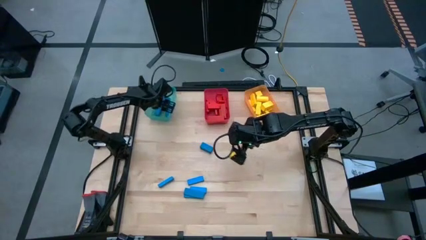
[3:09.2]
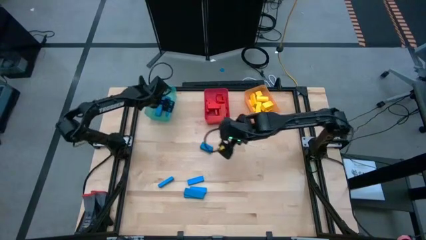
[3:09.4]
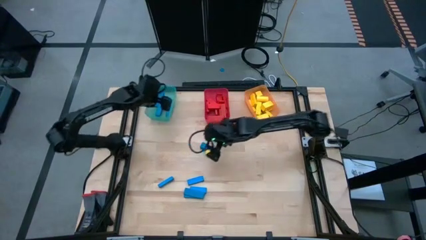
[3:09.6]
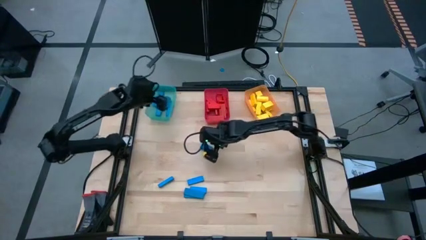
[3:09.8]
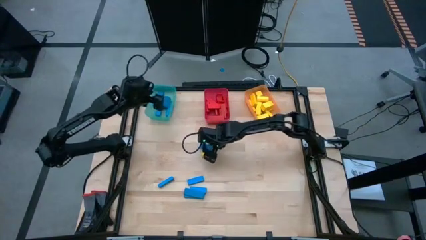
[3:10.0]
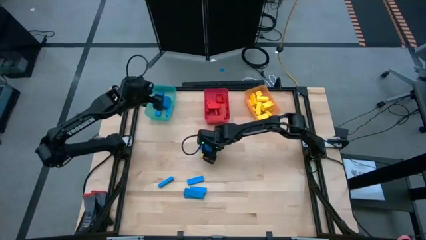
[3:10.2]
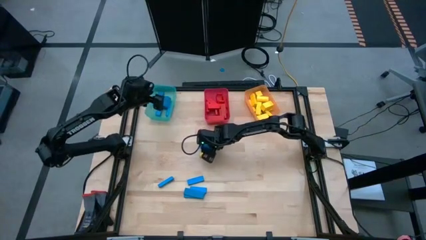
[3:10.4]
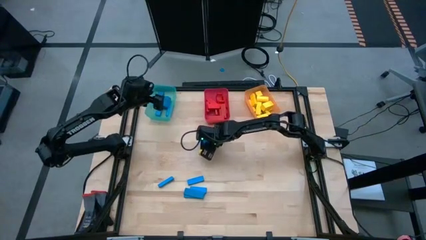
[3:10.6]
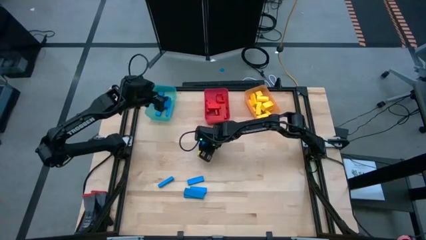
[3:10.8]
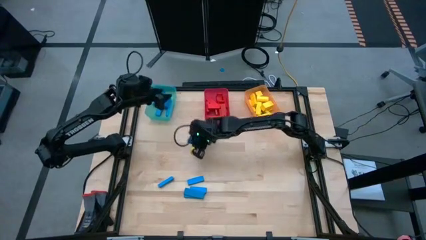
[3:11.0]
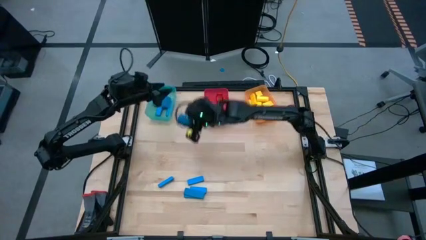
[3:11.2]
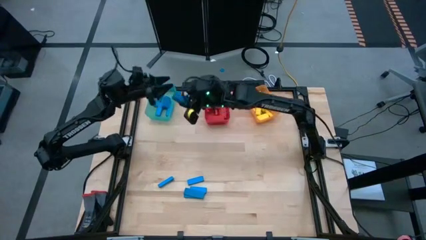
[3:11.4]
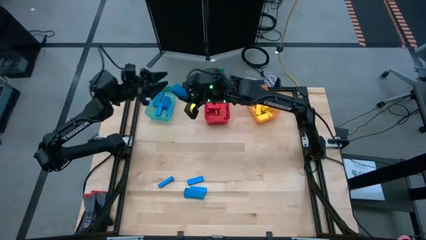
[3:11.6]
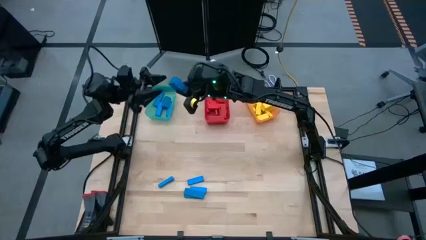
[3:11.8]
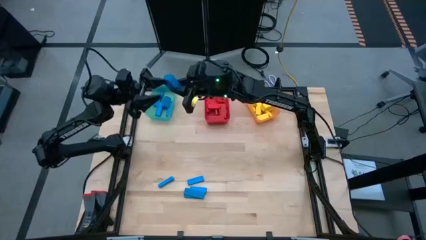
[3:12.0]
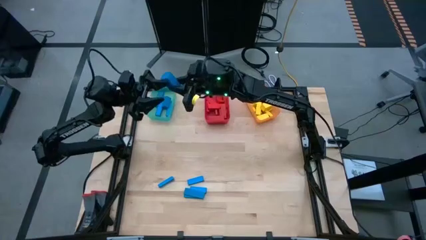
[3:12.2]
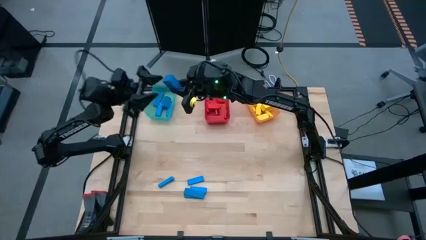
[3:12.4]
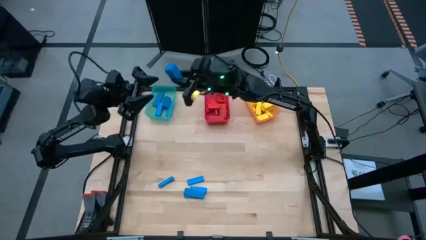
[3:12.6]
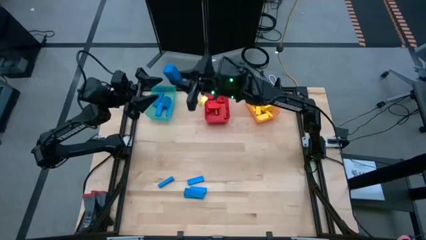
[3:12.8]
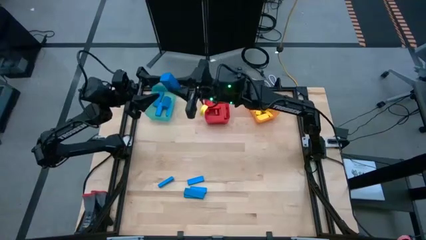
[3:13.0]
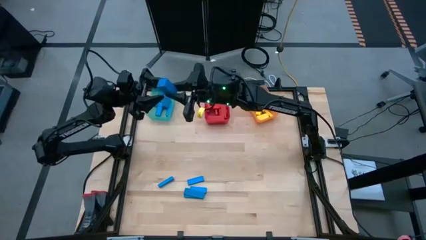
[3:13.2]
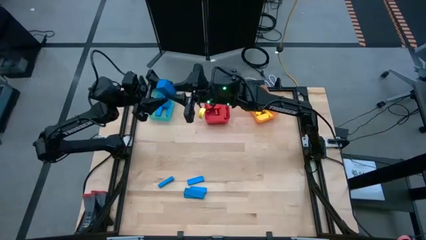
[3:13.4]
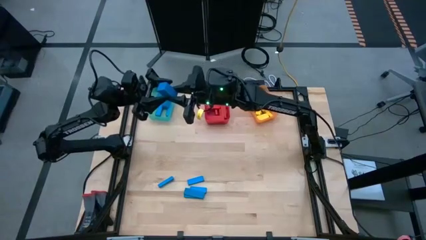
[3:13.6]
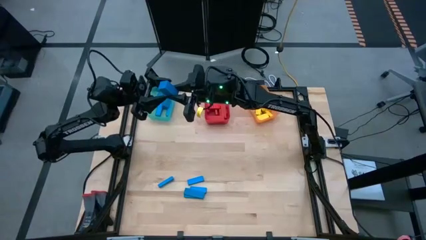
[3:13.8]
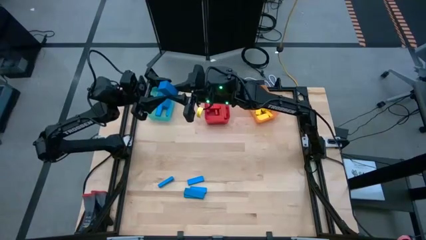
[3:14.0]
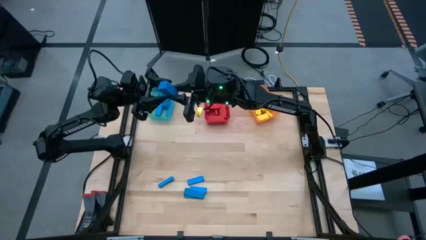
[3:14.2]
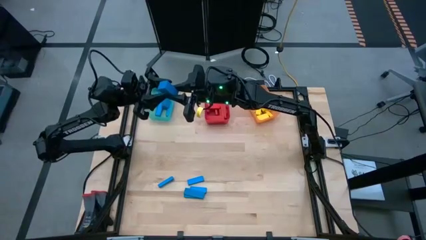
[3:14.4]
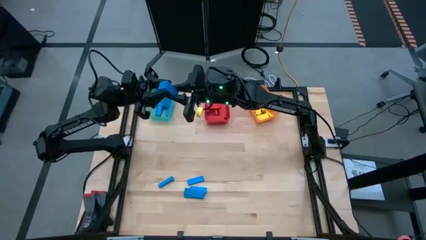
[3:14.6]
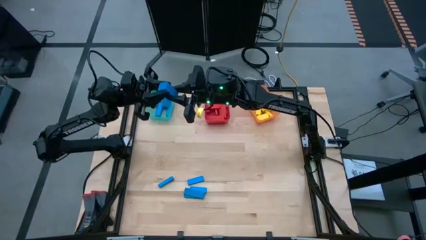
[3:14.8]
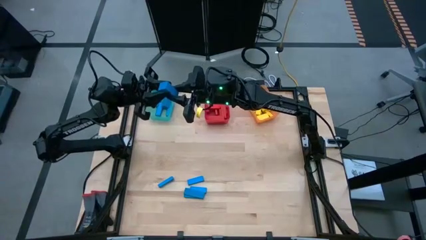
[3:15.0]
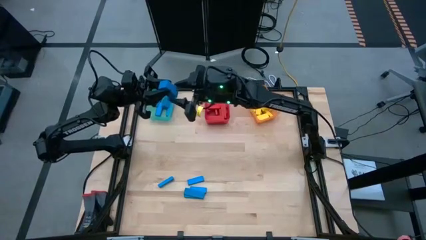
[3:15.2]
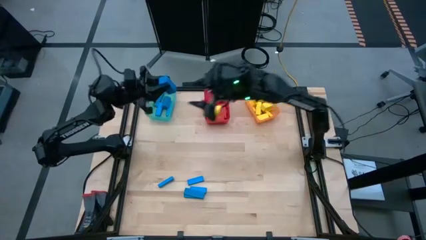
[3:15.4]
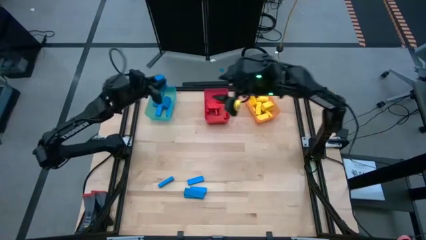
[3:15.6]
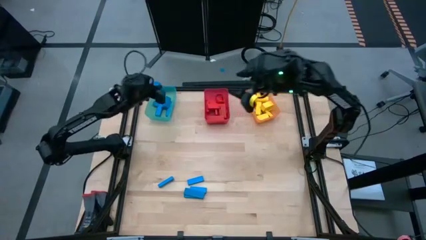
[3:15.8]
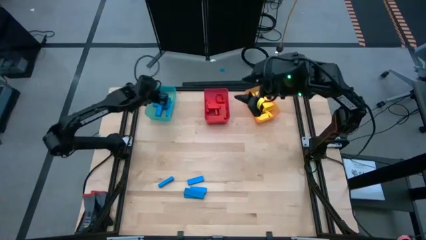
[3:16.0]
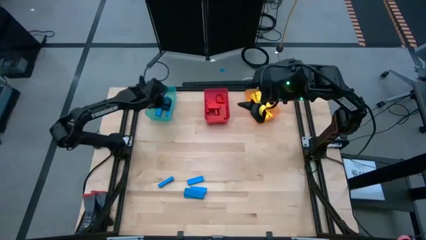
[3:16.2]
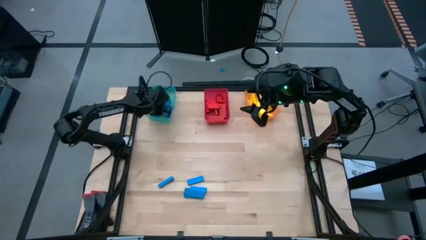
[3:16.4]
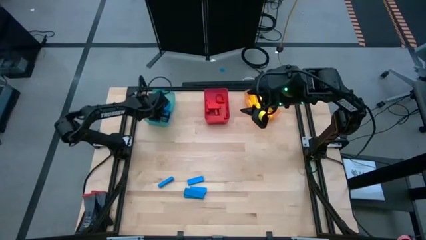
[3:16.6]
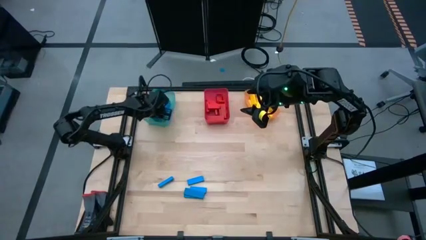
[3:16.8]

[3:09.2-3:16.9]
Task: Sort blocks
Put the blue block into the blue bin

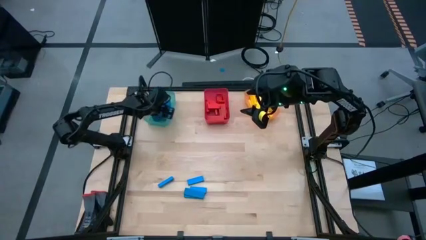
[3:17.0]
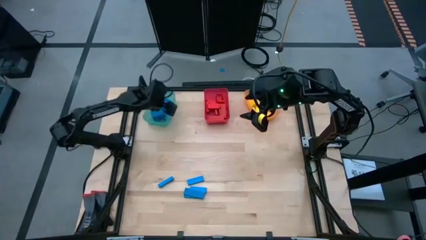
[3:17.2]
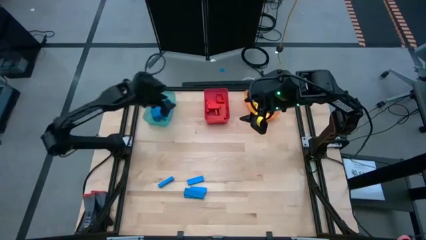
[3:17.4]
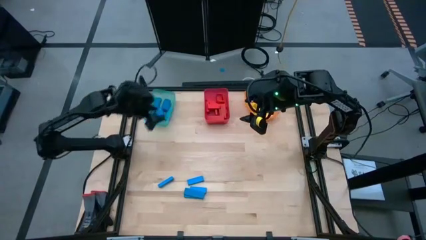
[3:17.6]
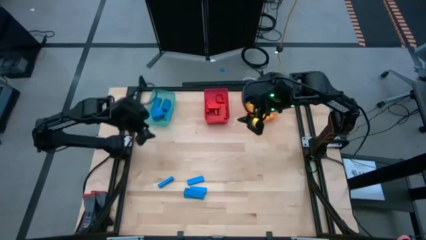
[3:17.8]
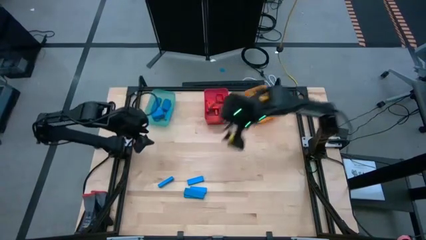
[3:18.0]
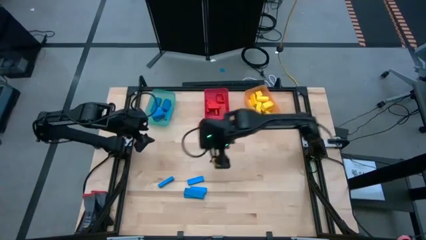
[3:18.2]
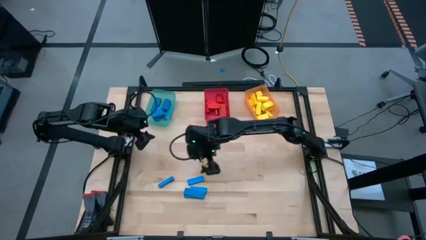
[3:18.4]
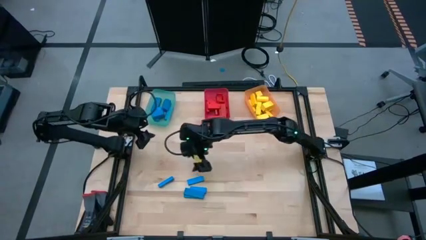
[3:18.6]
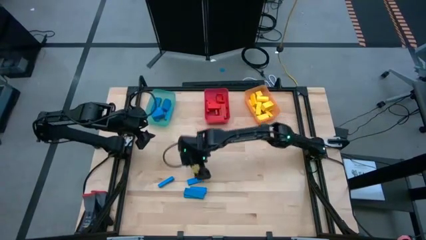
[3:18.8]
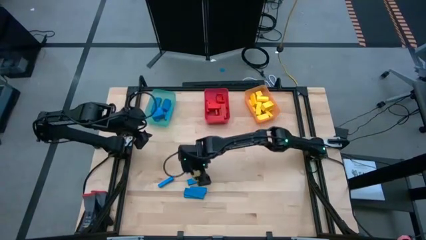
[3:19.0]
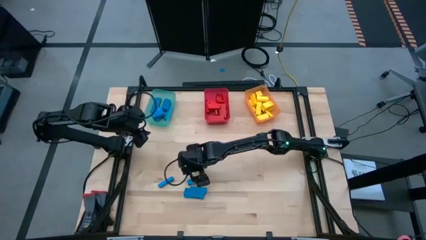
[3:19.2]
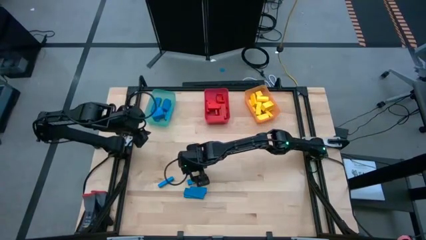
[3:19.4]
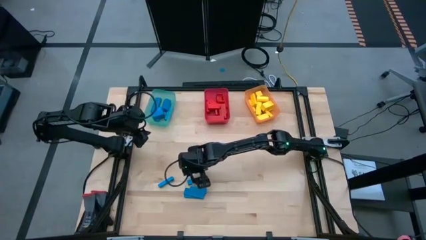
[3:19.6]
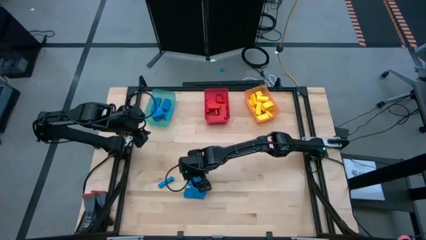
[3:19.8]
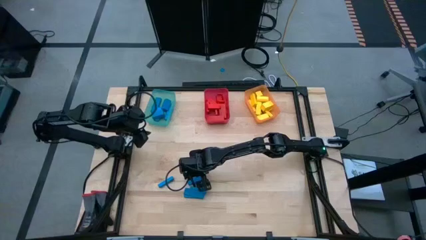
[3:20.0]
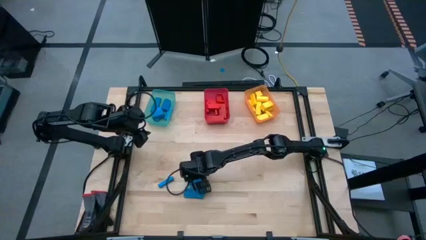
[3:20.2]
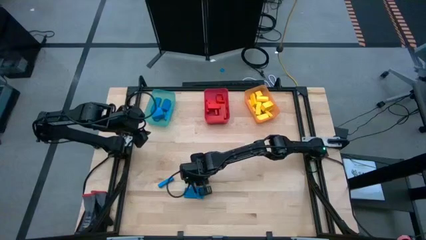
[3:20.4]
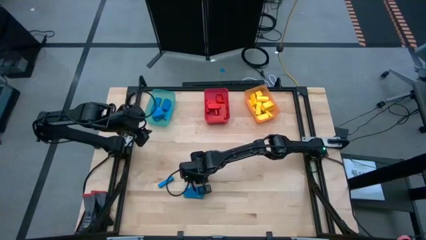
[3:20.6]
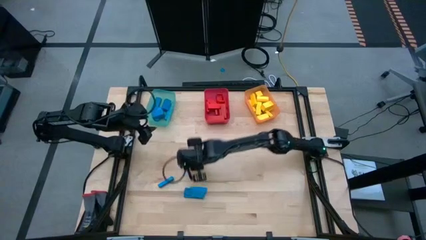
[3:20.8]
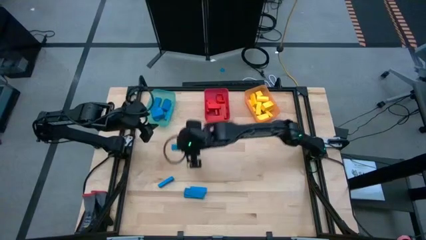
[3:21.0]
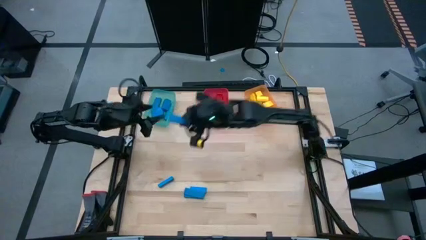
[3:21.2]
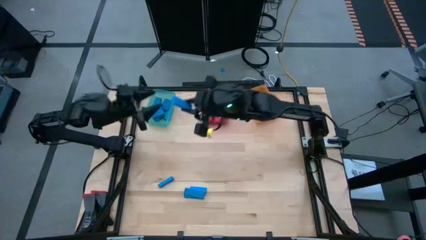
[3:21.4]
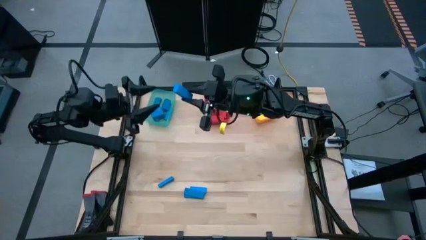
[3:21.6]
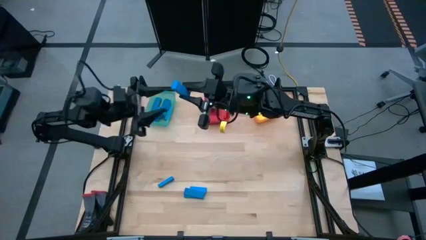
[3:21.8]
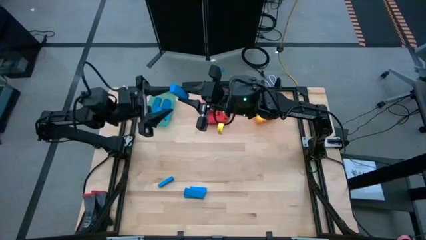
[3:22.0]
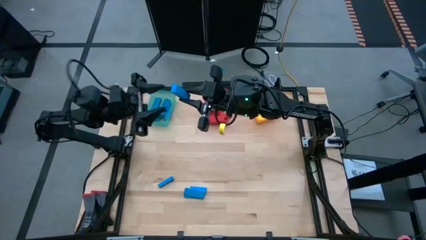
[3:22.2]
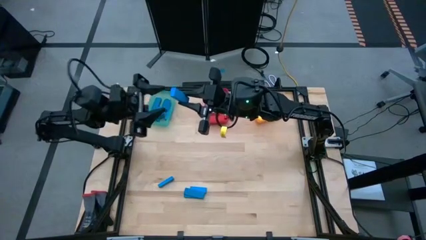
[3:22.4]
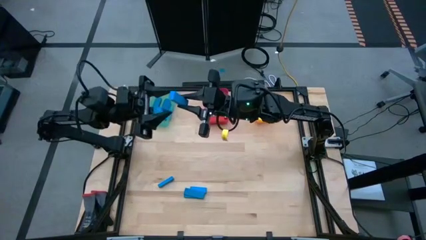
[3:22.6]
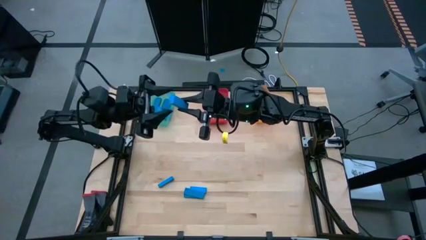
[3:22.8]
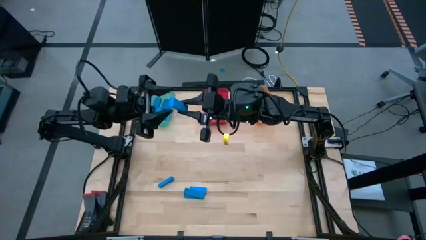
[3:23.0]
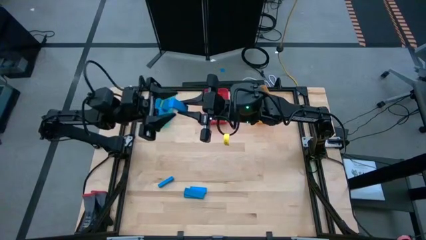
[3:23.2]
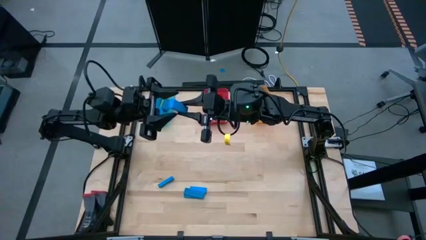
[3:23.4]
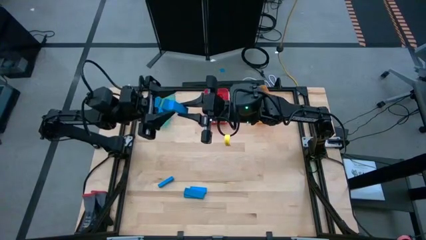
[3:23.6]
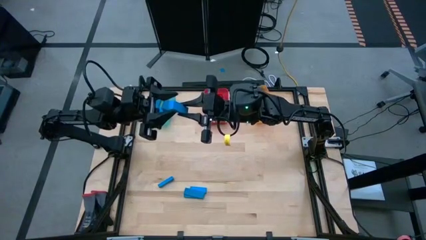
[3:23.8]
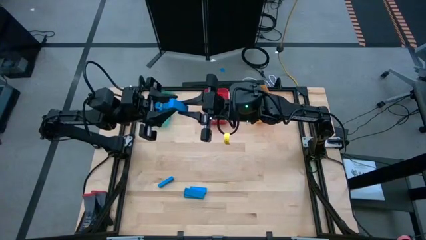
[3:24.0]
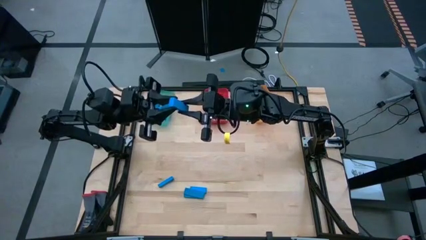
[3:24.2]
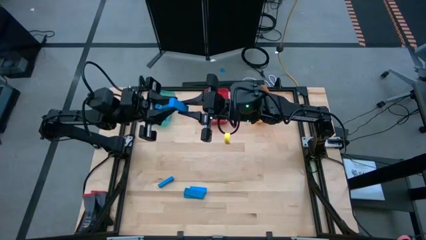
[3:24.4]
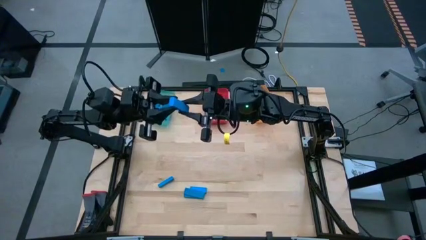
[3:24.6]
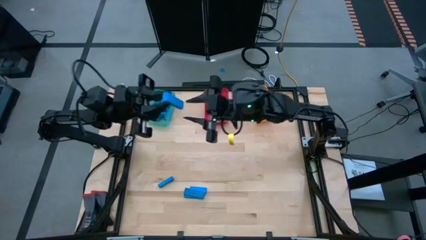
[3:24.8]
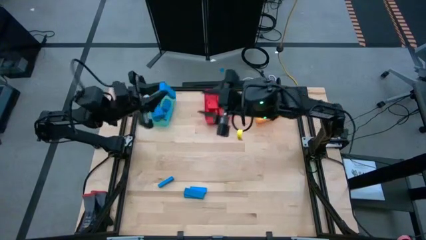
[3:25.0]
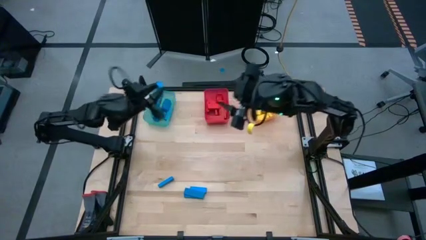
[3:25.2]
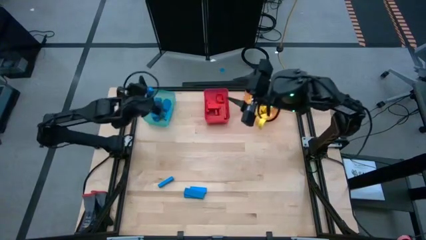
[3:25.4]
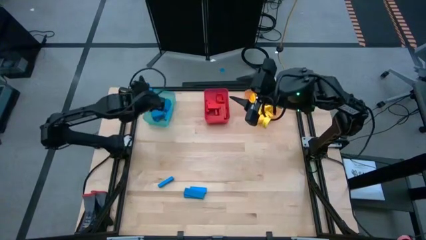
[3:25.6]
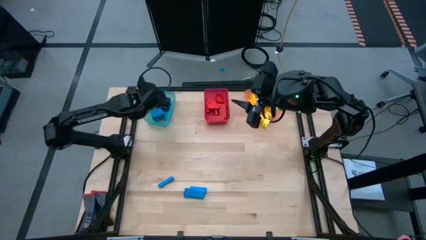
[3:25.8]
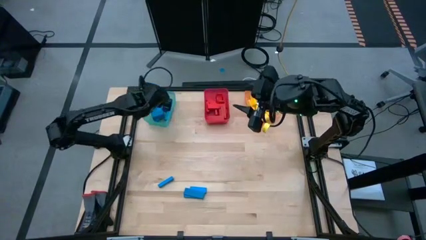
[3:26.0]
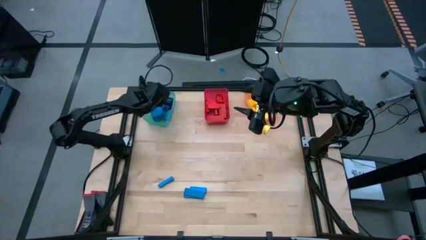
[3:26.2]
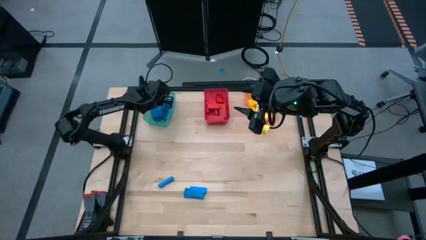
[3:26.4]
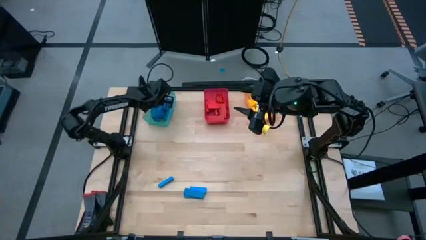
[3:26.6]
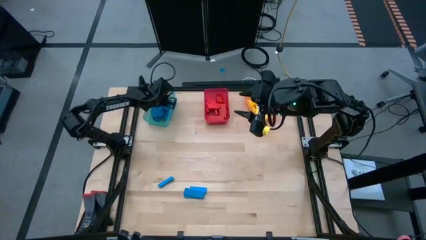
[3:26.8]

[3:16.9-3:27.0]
Put the blue block into the blue bin
